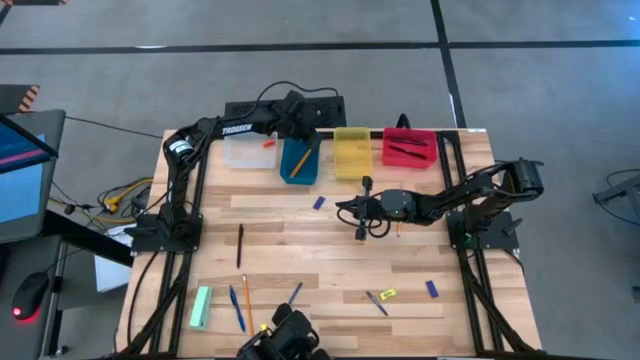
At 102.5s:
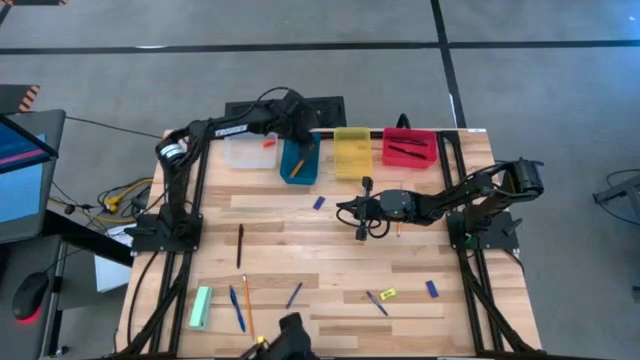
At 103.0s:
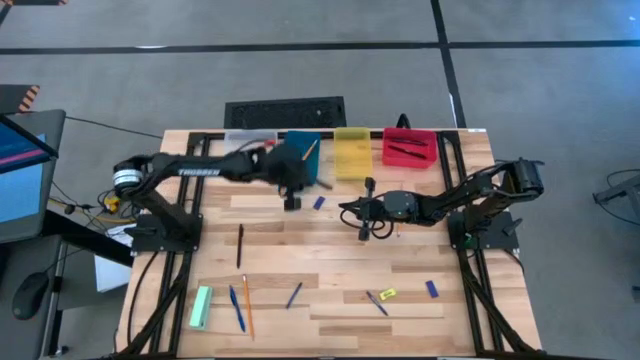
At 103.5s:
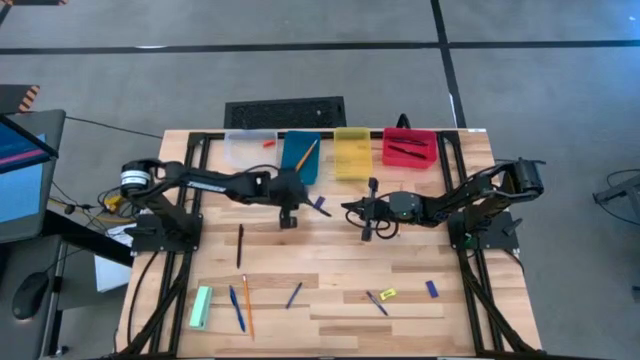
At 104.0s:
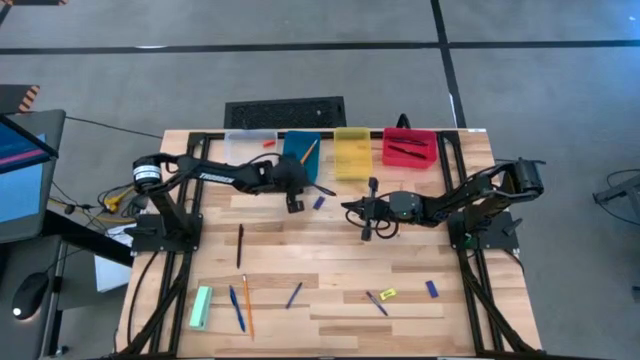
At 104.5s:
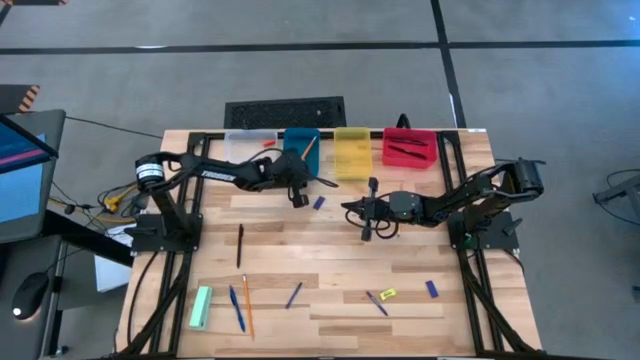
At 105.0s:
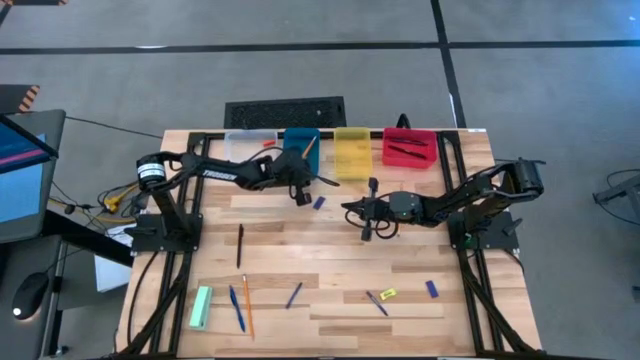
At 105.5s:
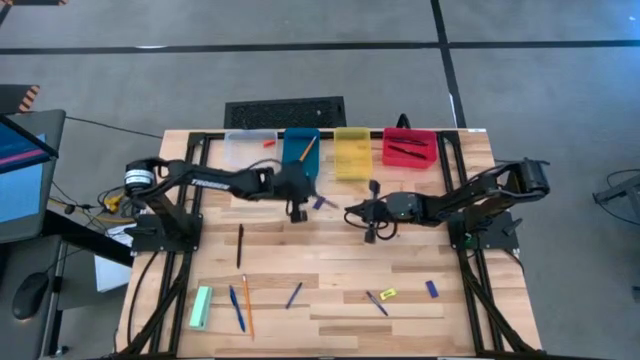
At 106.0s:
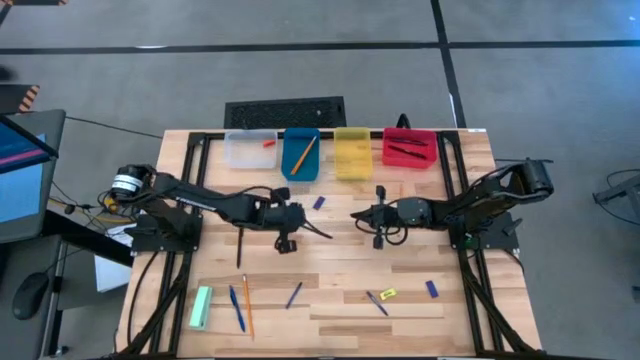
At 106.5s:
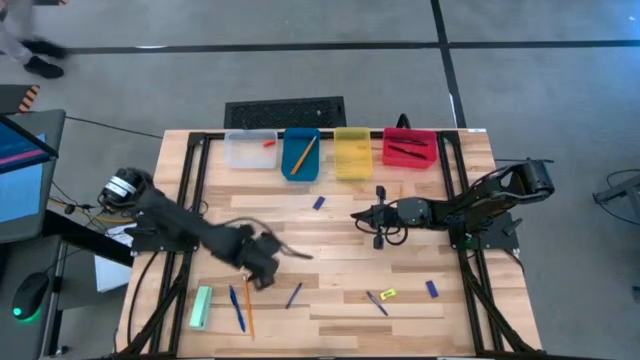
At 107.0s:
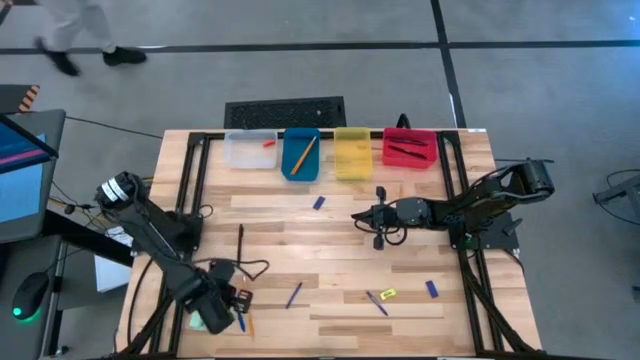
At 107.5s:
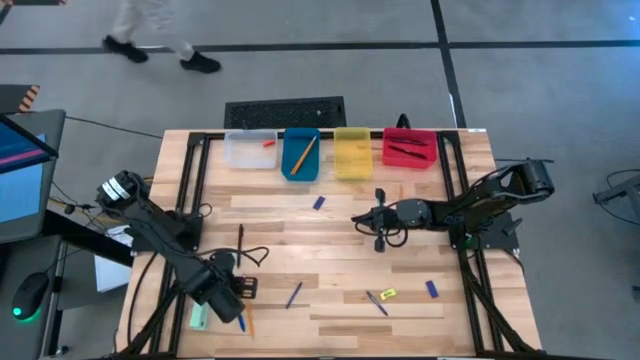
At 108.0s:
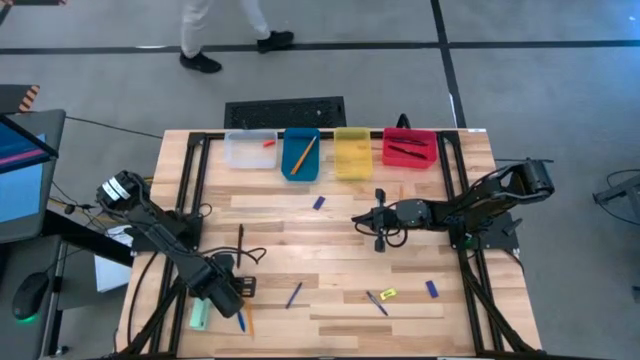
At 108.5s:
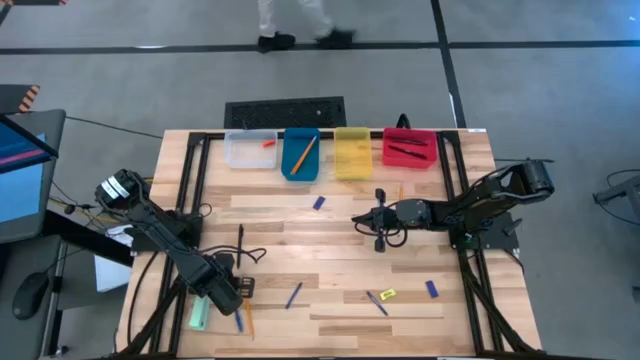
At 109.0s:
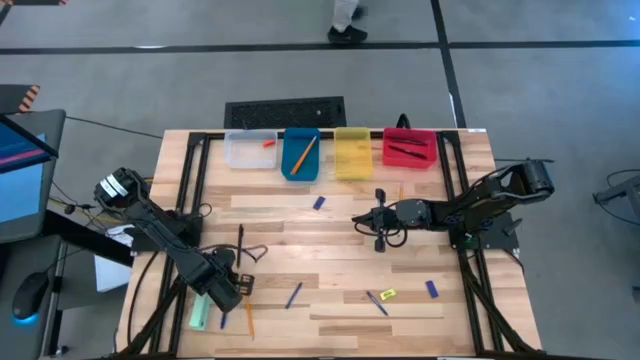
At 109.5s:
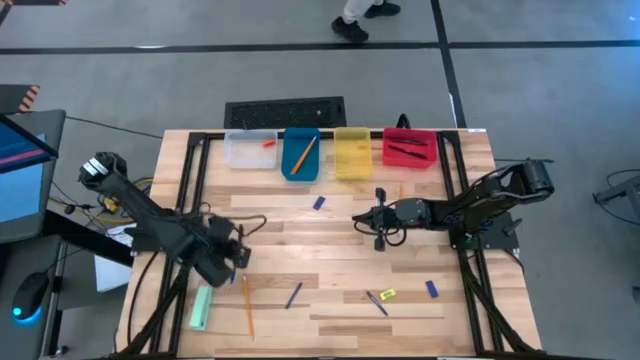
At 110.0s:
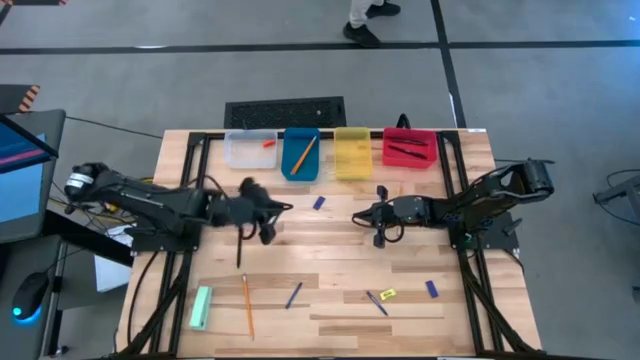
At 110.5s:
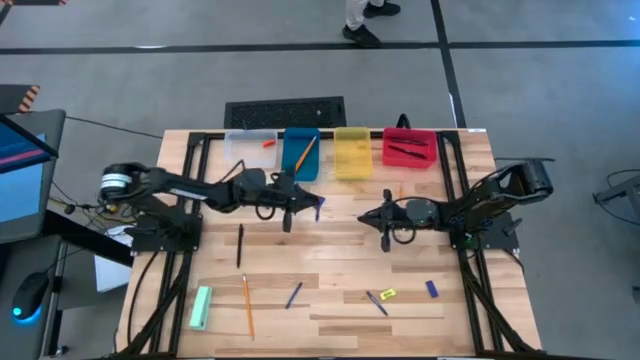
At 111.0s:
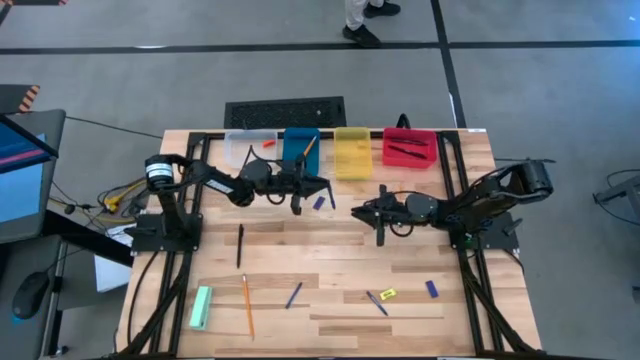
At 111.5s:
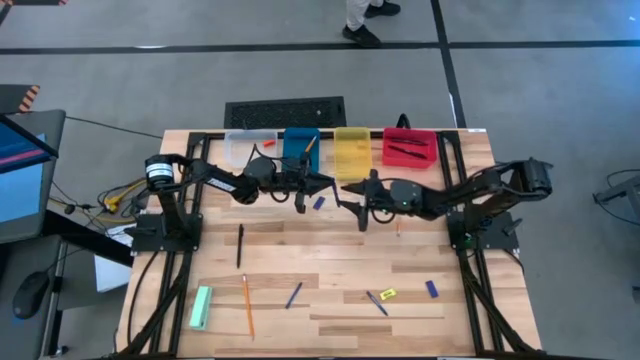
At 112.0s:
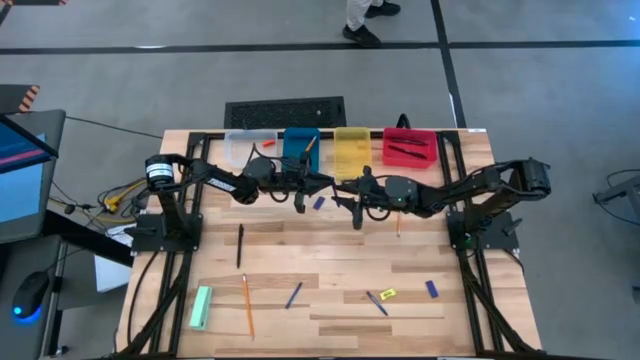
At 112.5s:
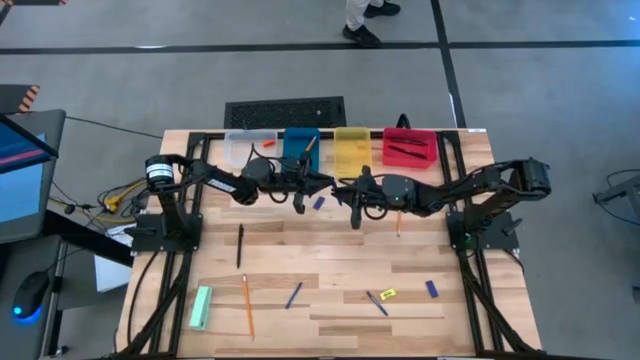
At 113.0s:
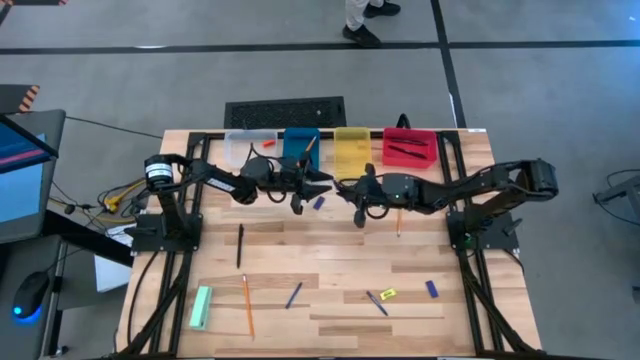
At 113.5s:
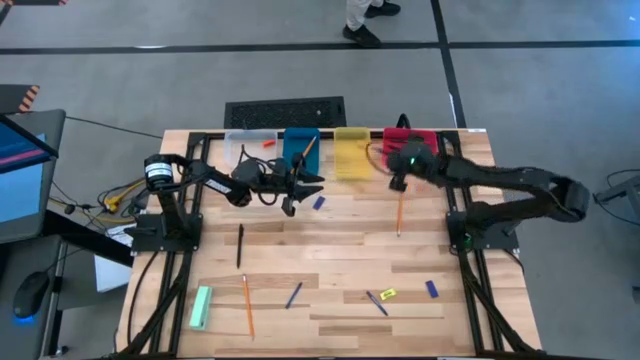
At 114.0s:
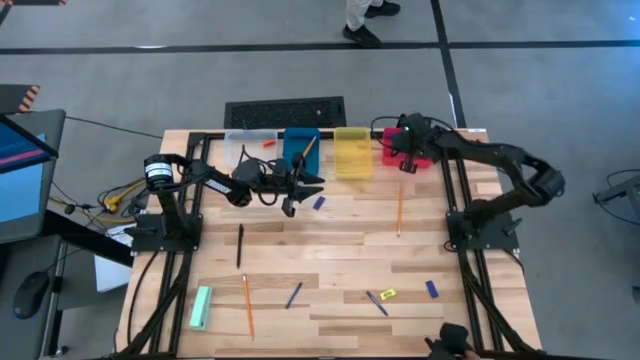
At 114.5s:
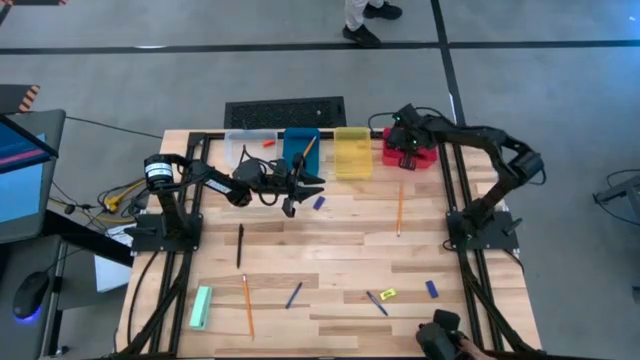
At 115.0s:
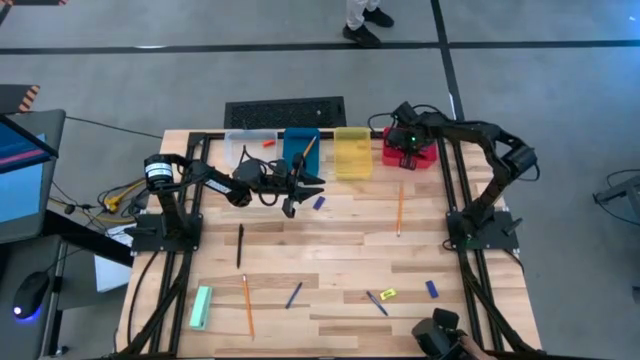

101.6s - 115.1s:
Task: Sort crayons/erasers/pens/pencils in bins
Put the blue pen into the red bin

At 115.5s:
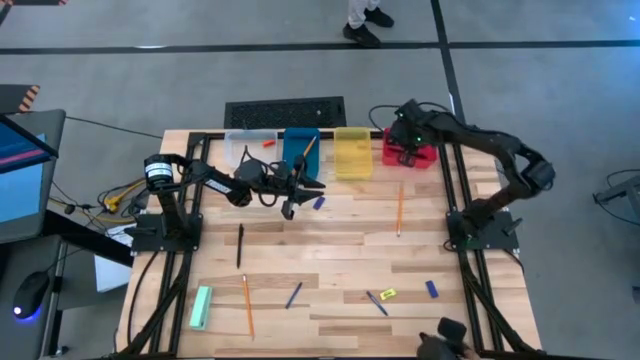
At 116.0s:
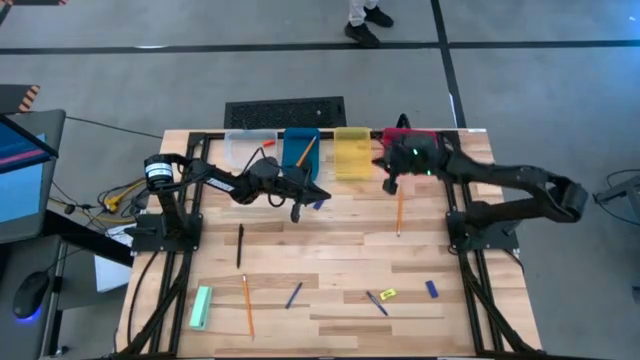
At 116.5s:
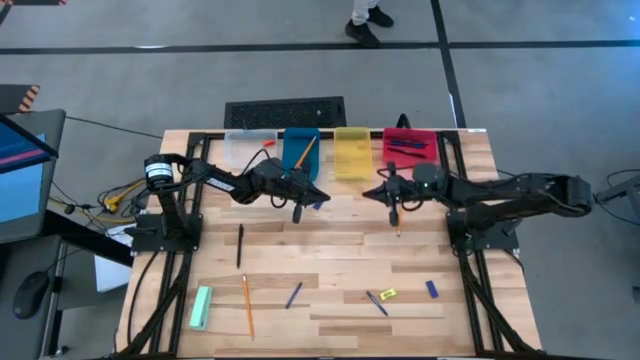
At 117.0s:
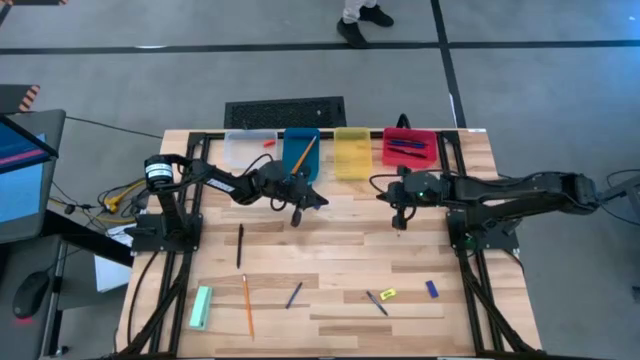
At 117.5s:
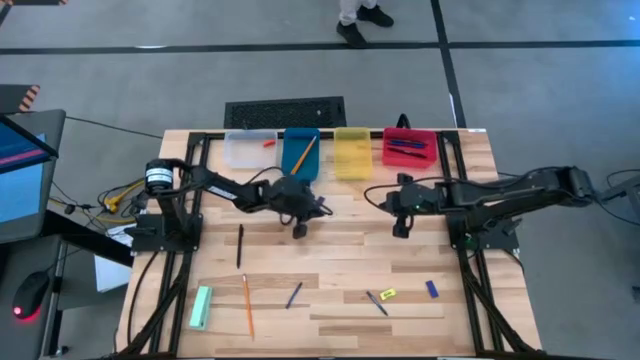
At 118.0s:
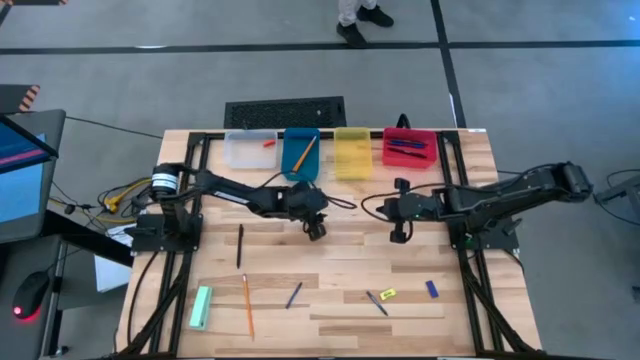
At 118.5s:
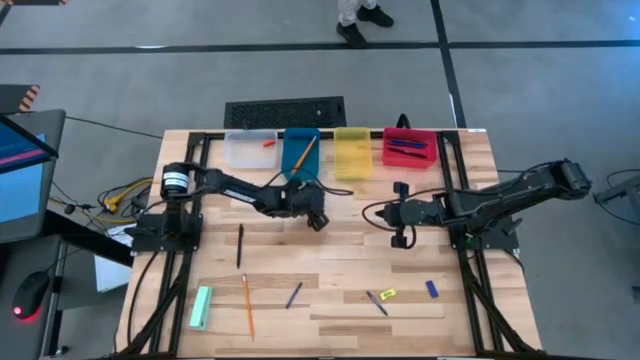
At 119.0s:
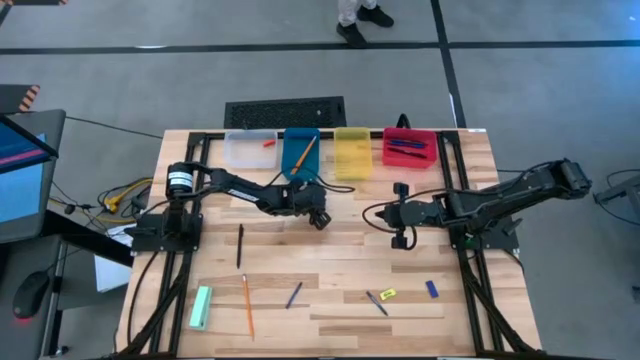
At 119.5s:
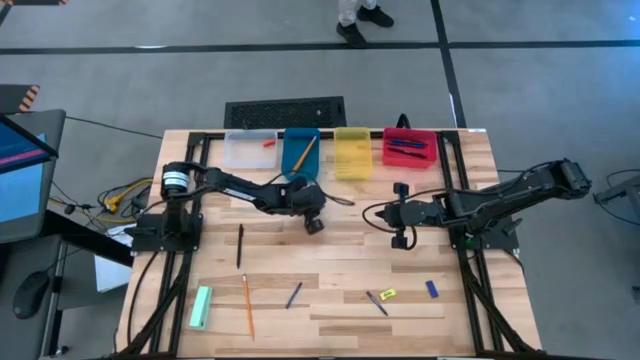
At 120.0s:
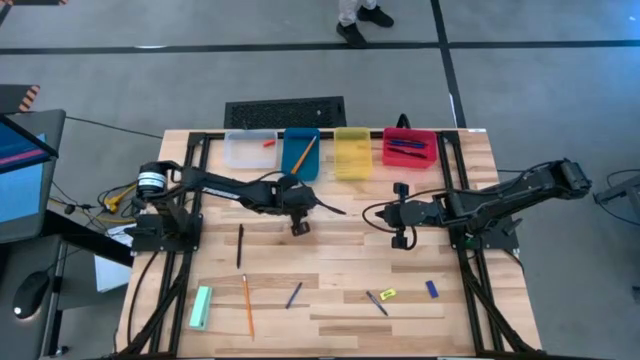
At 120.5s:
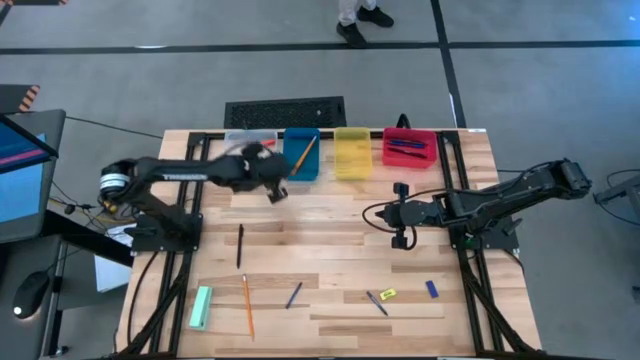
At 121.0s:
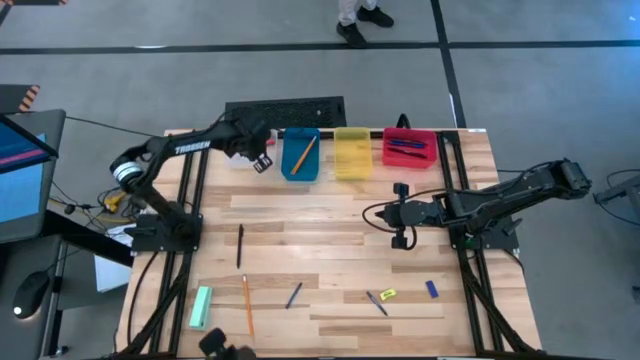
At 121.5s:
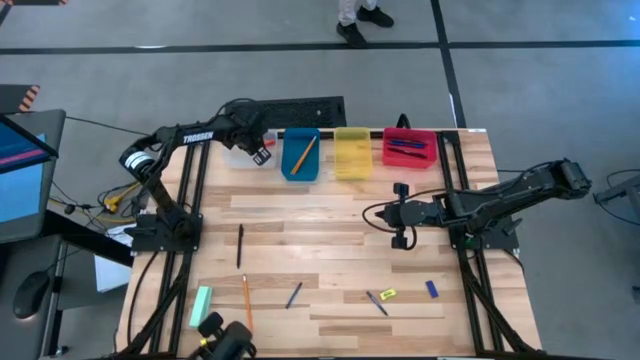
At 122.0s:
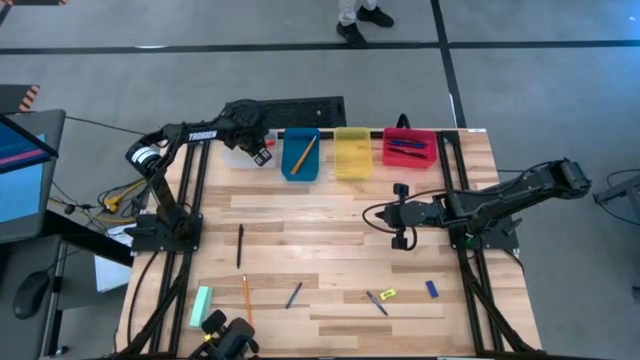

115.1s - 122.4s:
Put the blue eraser into the transparent bin

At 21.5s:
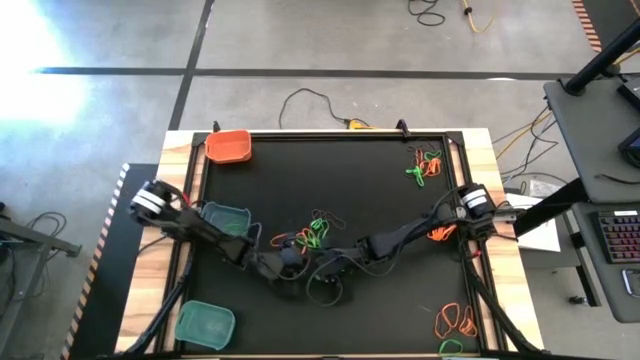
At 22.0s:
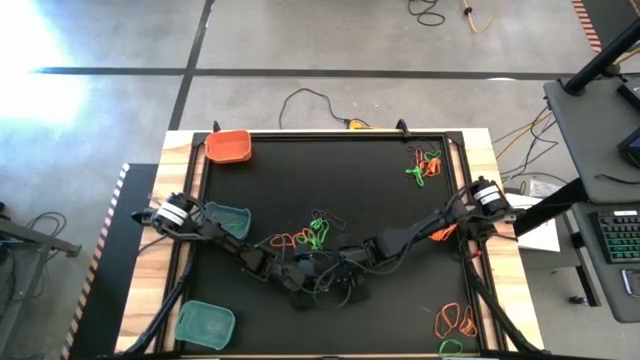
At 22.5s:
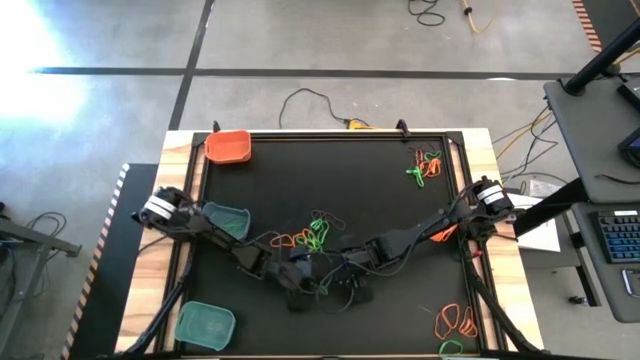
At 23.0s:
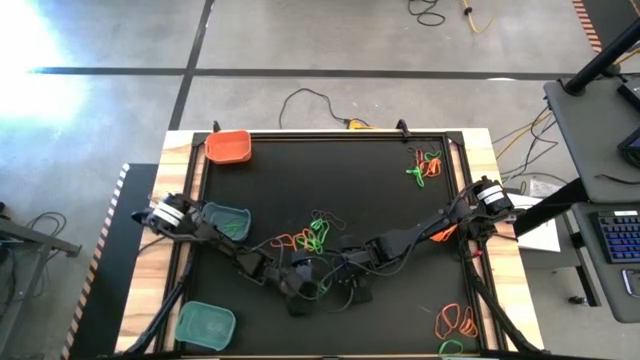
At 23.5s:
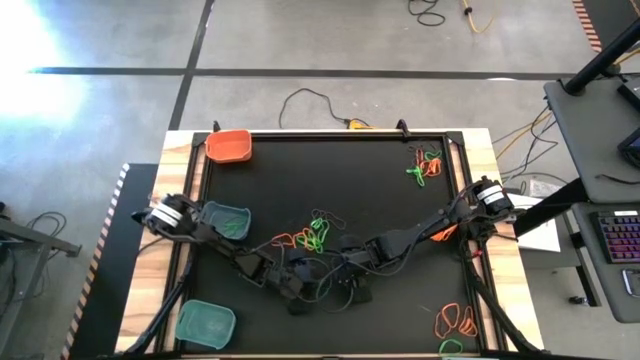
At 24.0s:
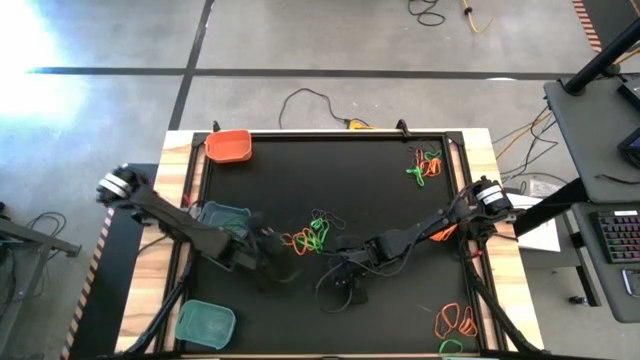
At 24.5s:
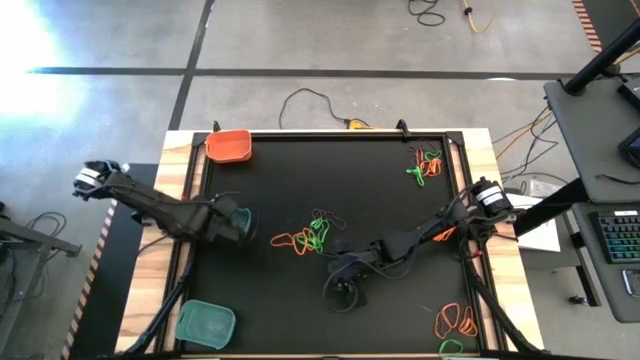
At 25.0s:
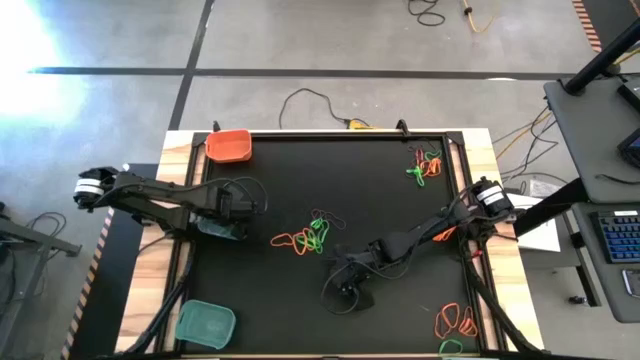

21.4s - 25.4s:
Task: Sort rubber bands into baskets
Put the green rubber band into the blue bin
